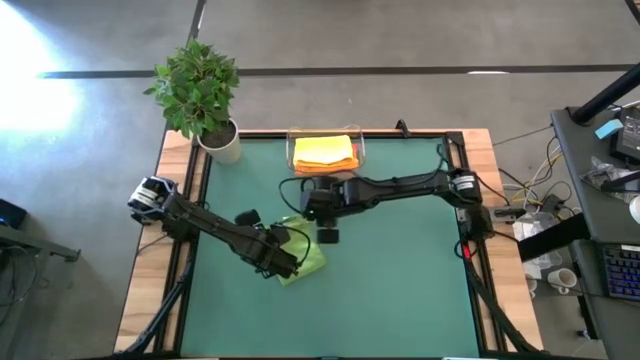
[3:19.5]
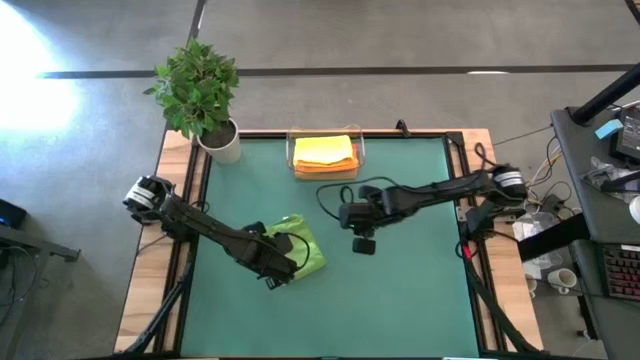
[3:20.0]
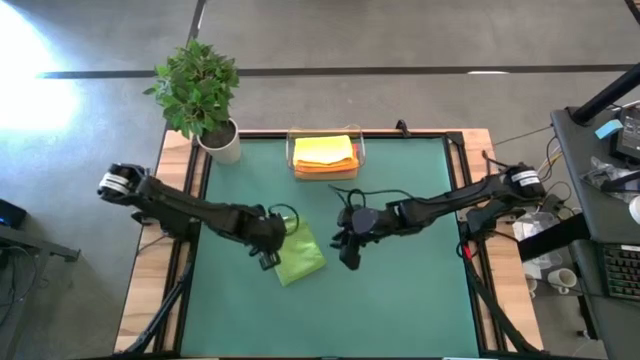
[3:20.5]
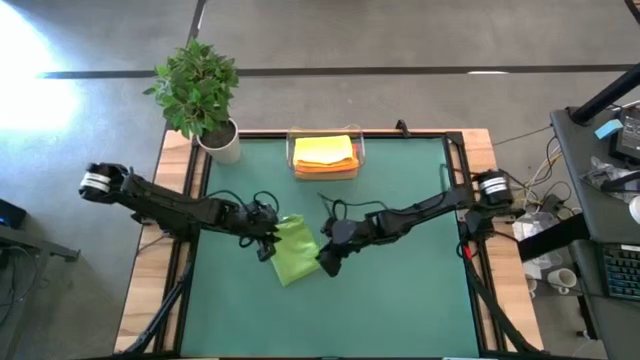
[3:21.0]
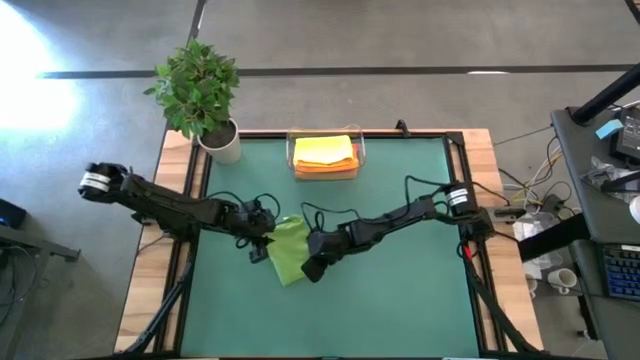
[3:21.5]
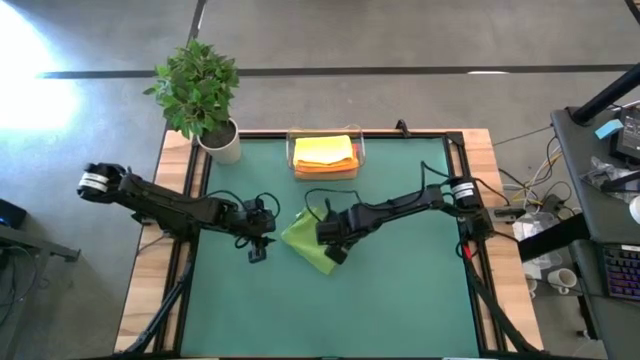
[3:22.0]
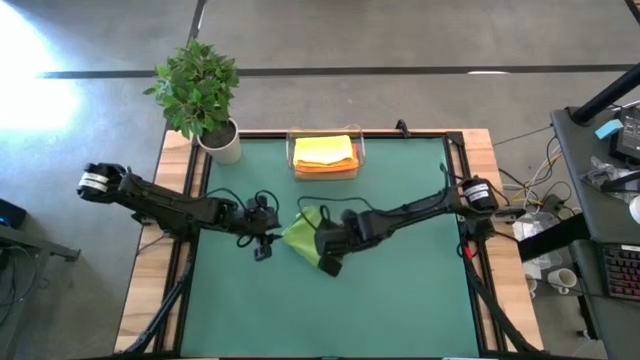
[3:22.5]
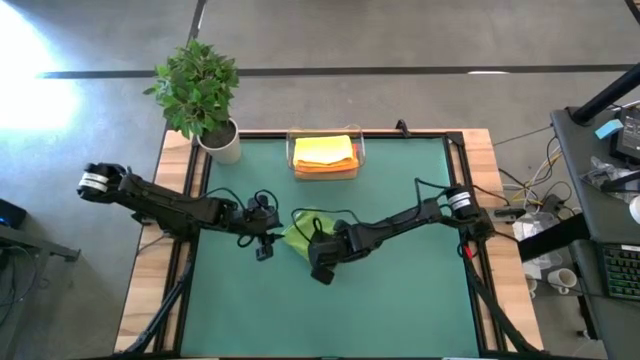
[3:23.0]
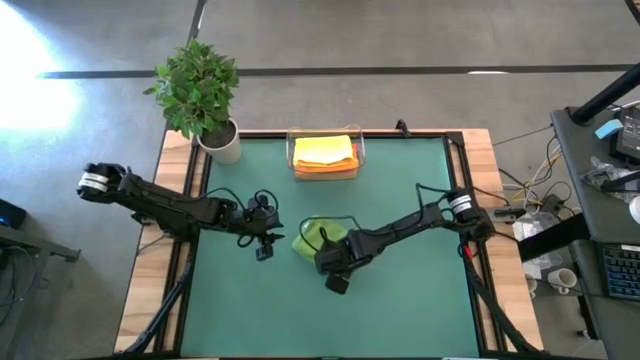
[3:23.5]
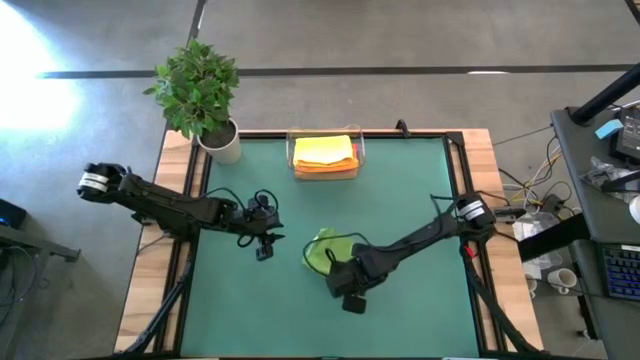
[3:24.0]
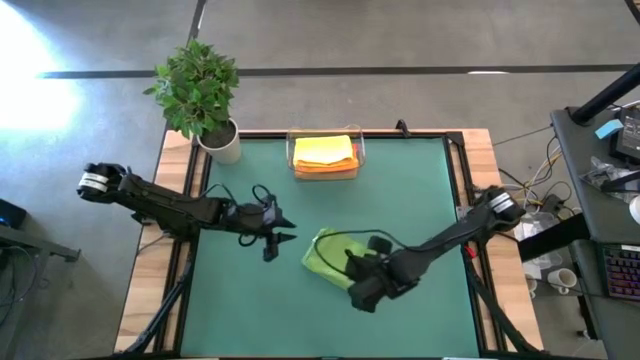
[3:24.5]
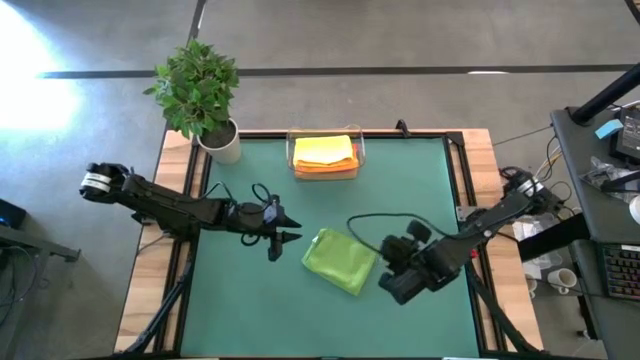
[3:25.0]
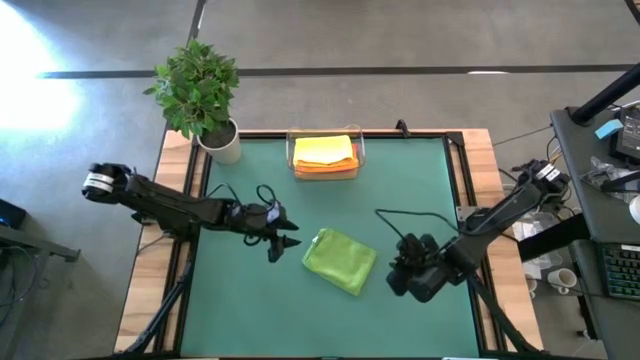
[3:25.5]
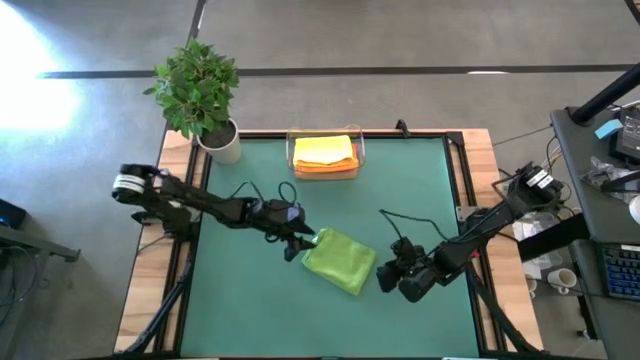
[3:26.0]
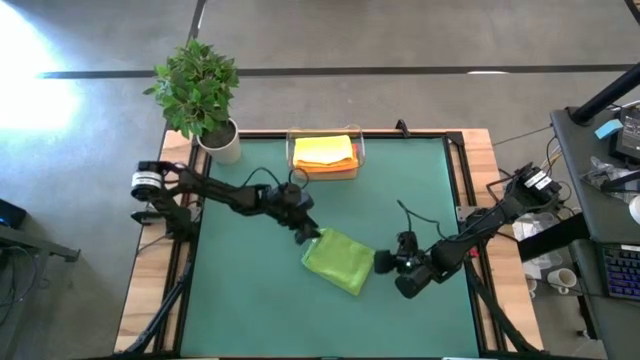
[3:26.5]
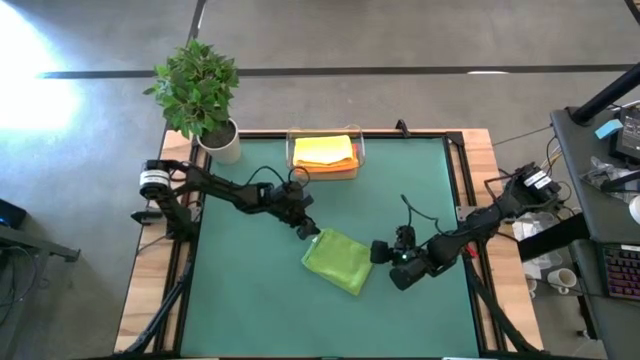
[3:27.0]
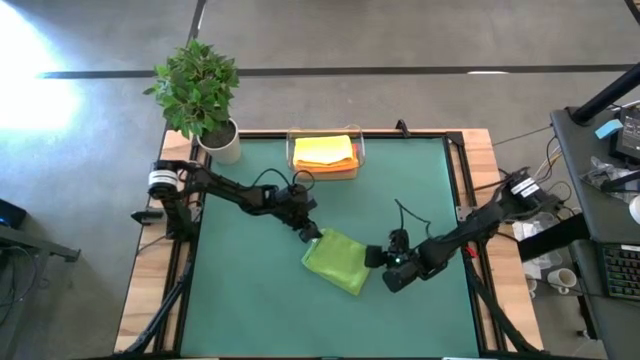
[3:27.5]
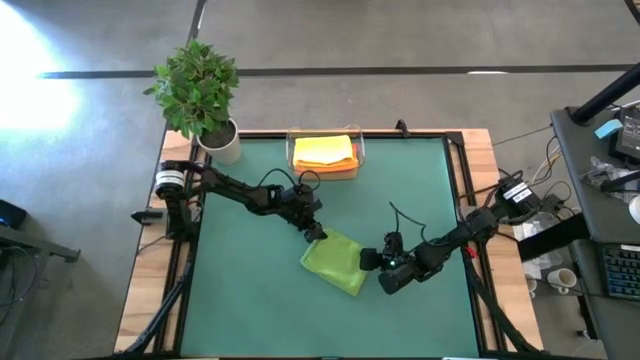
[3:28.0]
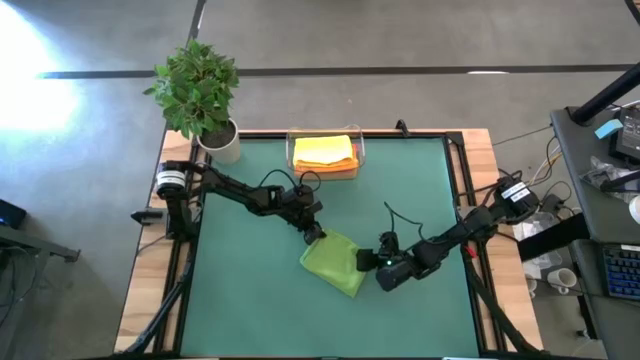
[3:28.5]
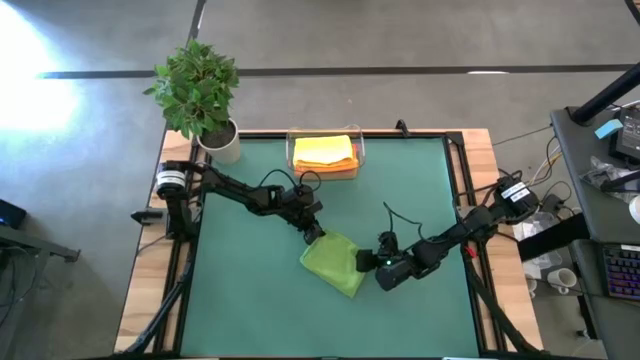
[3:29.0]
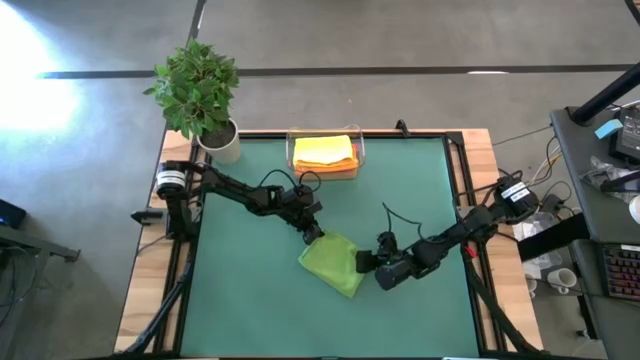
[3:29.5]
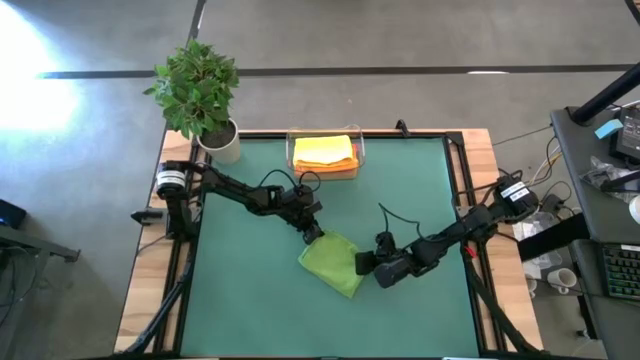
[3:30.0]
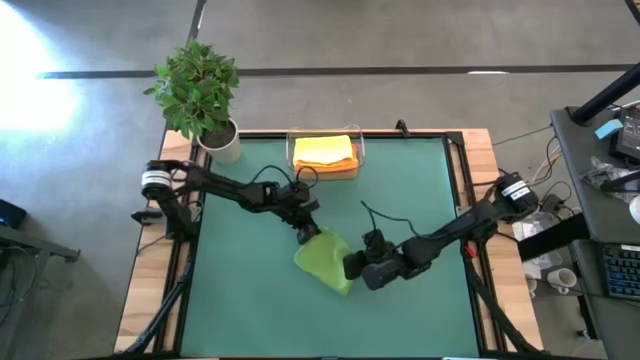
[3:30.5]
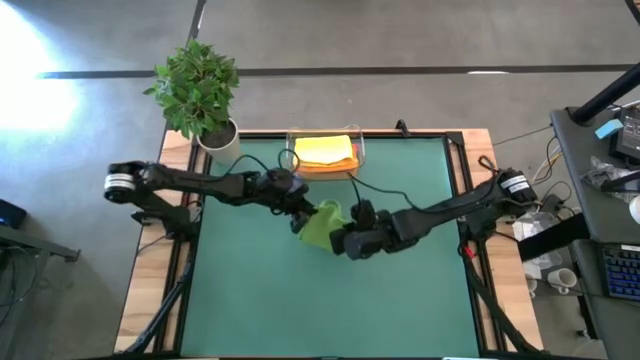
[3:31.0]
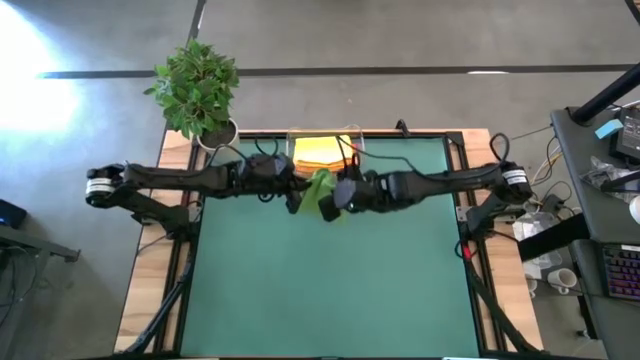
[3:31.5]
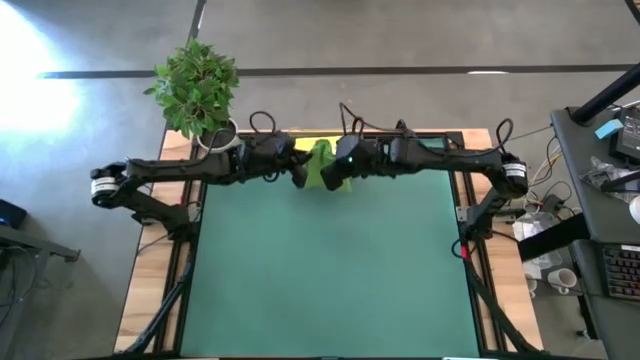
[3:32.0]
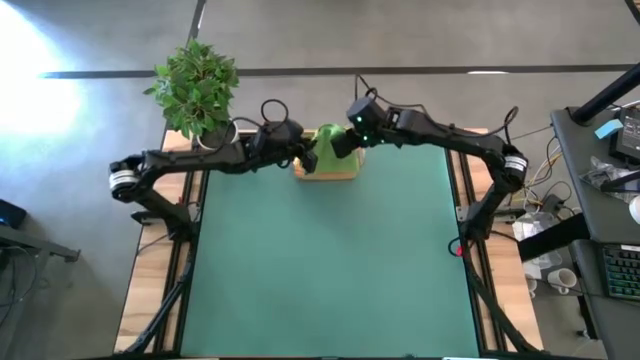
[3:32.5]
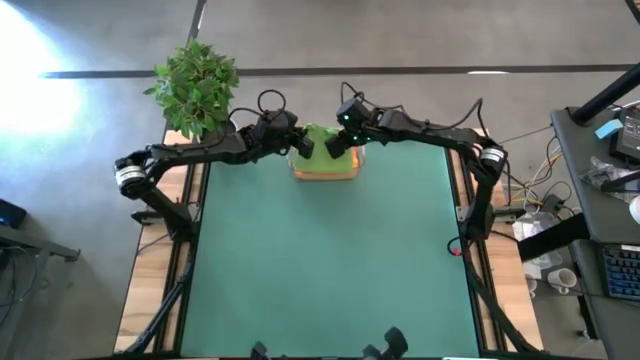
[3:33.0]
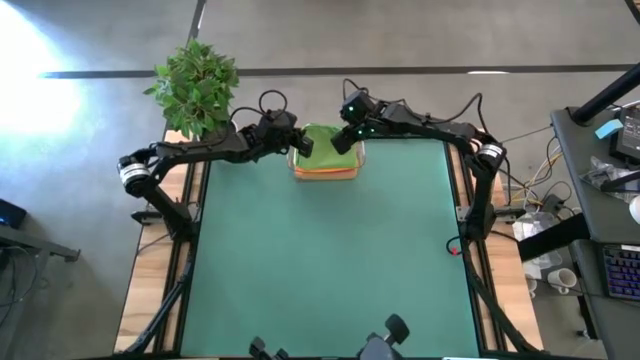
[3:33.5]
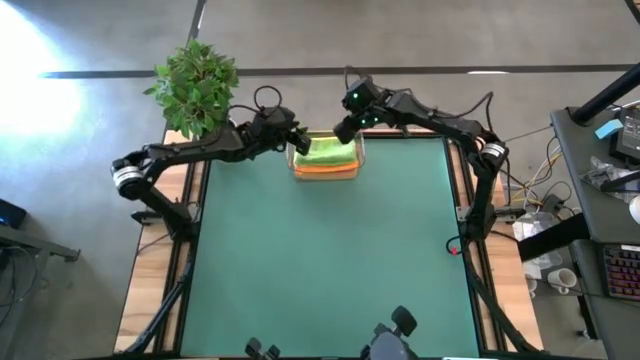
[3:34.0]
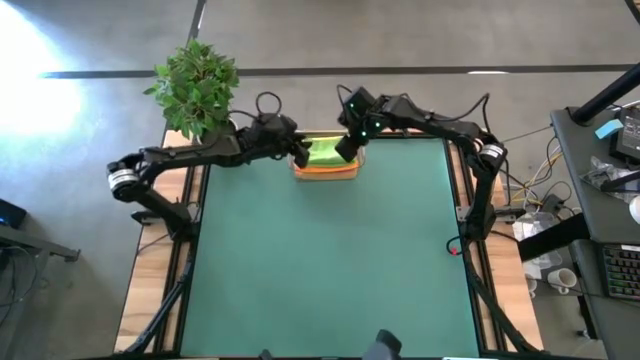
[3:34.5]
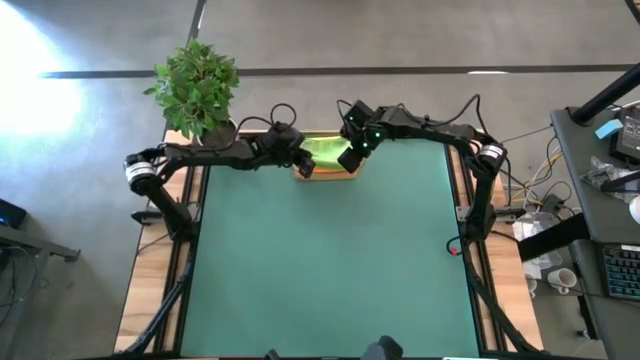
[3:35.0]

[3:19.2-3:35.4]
Task: Fold microfiber towels
Put the green microfiber cloth into the bin

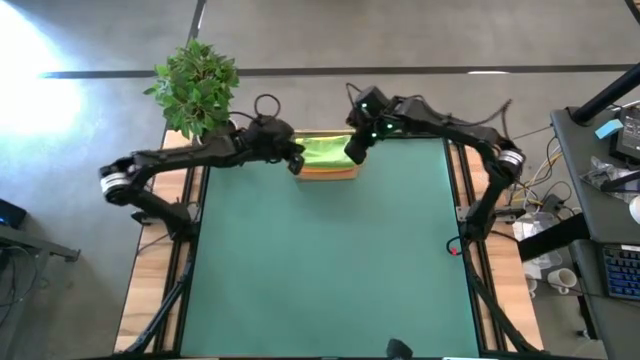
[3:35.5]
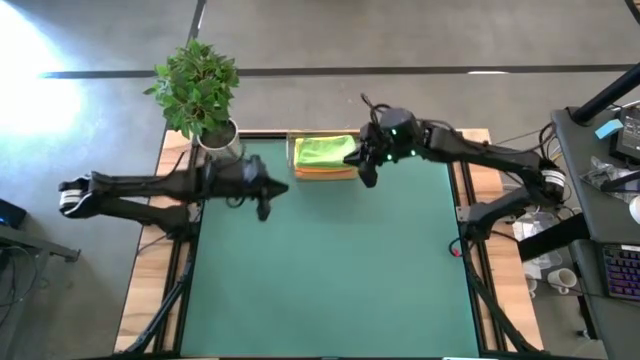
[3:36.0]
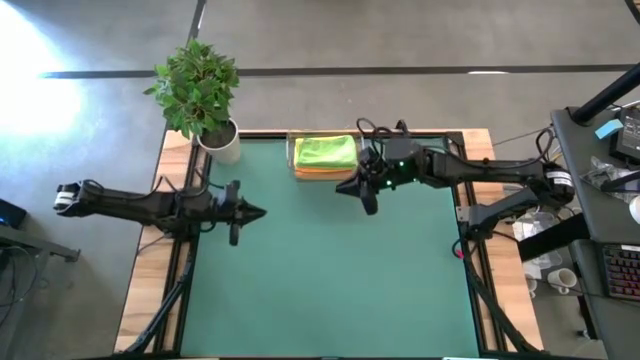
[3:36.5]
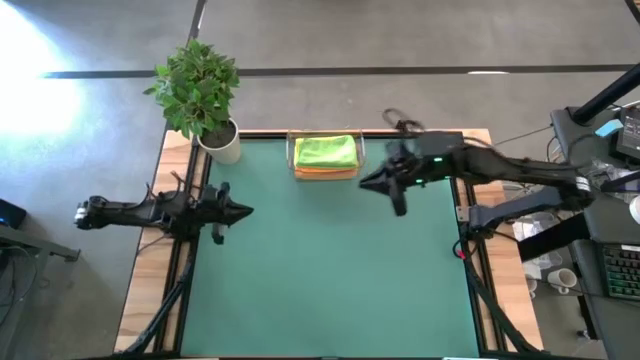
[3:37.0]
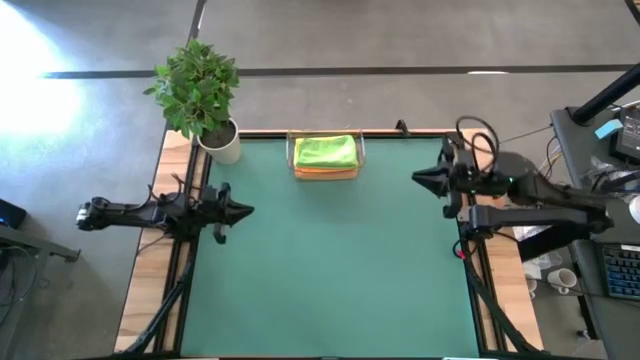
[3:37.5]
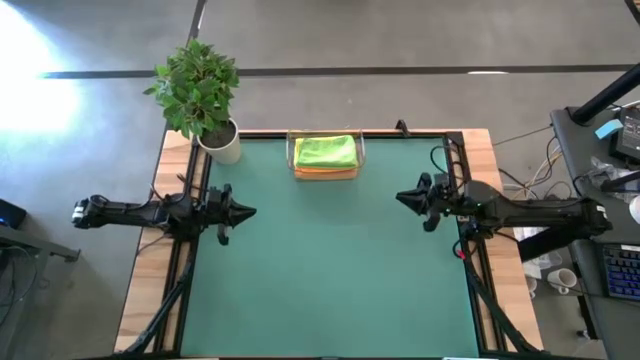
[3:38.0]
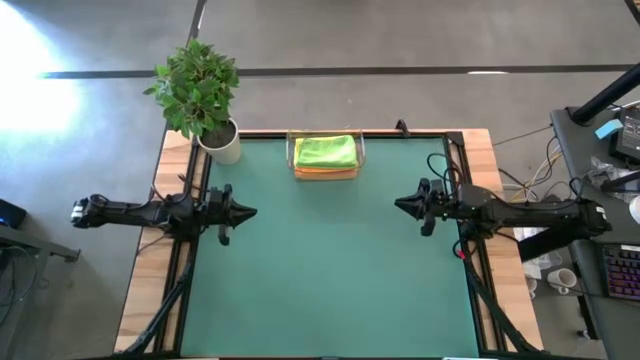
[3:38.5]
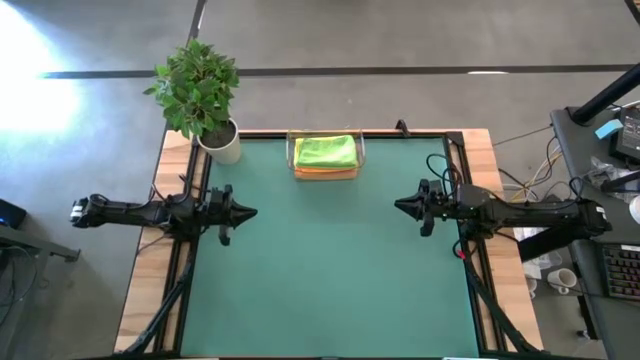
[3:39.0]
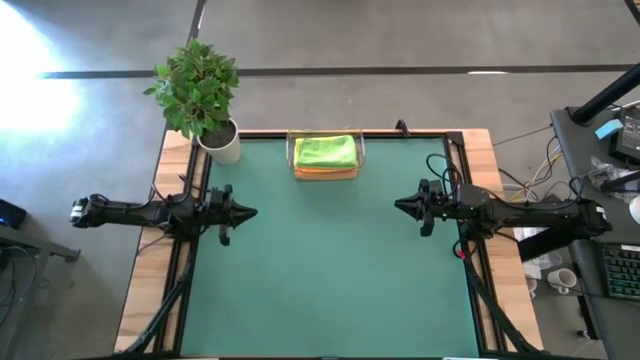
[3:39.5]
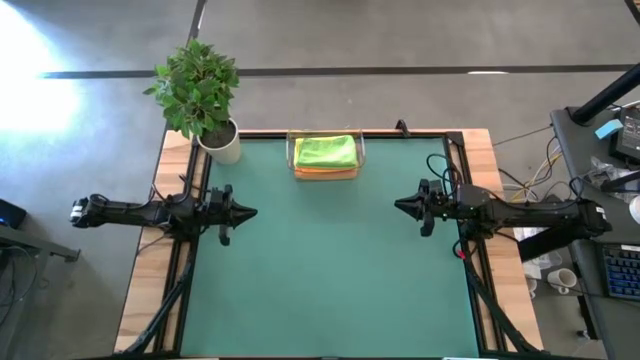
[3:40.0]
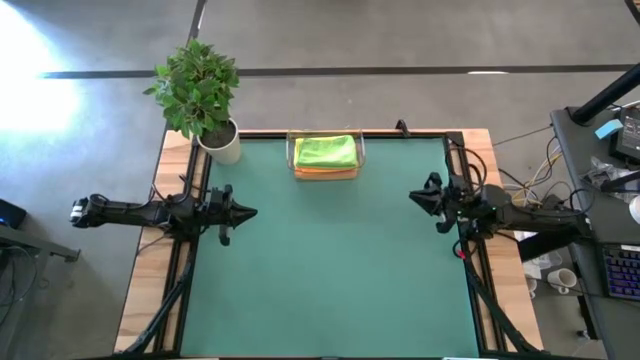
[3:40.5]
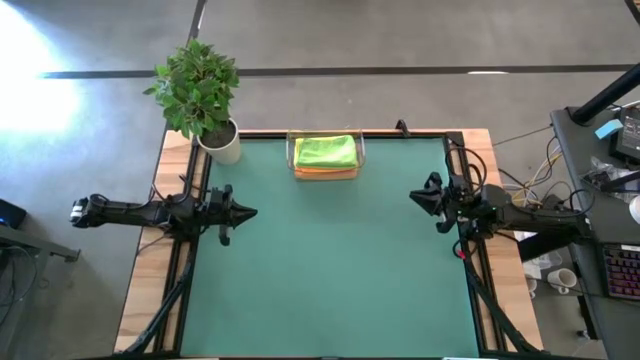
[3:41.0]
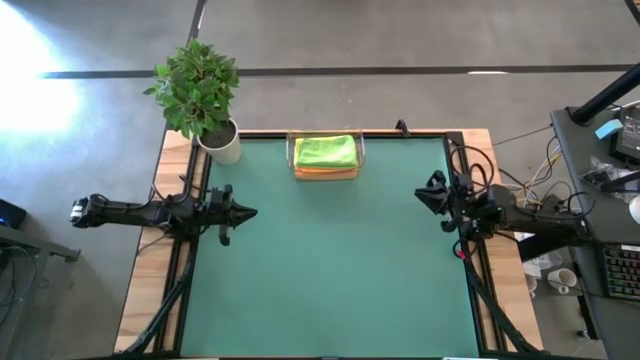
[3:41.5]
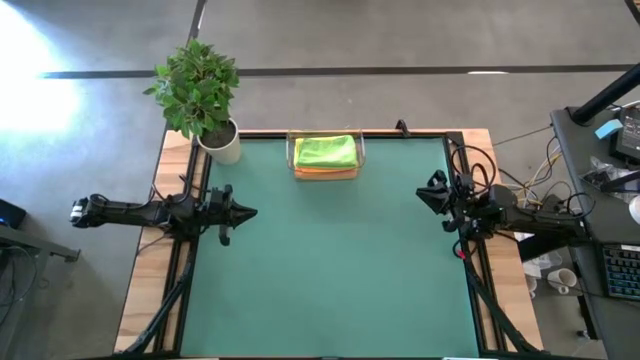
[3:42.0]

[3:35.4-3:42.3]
Return to Home Position
